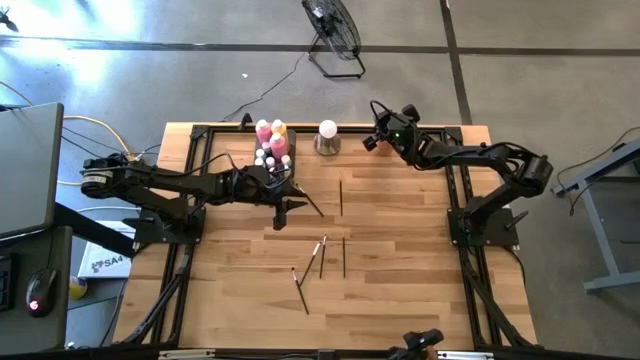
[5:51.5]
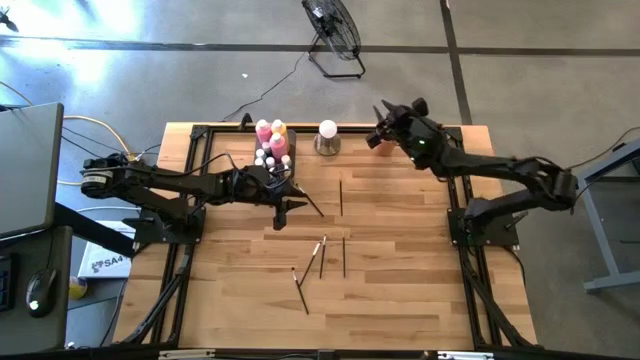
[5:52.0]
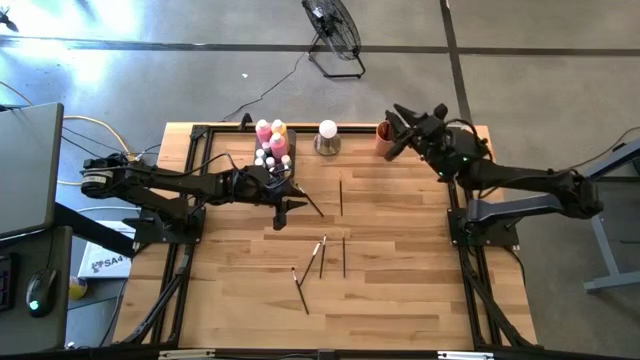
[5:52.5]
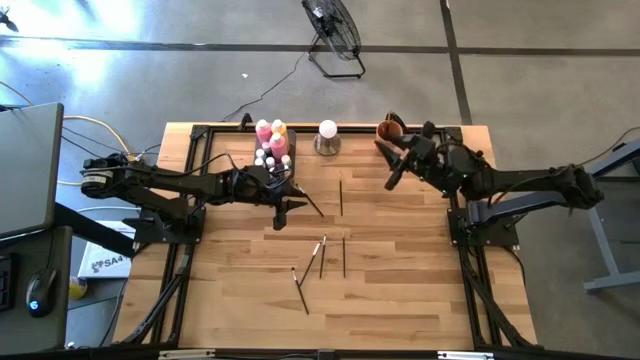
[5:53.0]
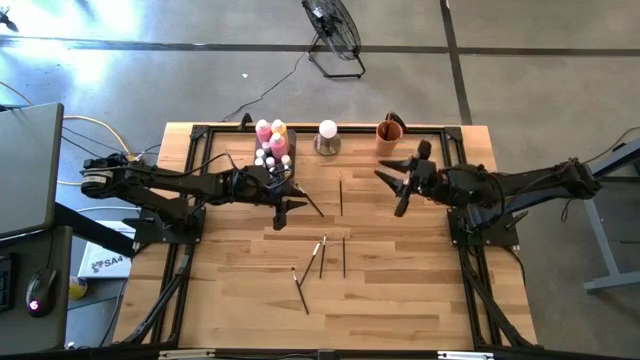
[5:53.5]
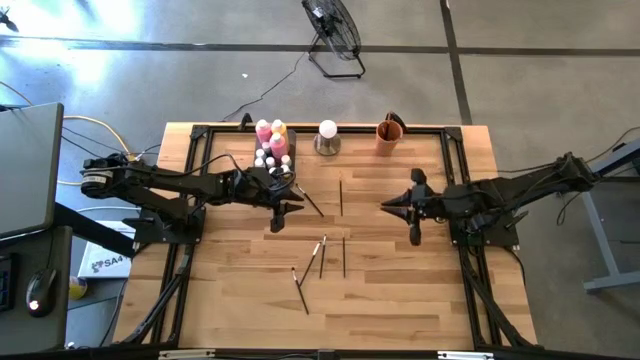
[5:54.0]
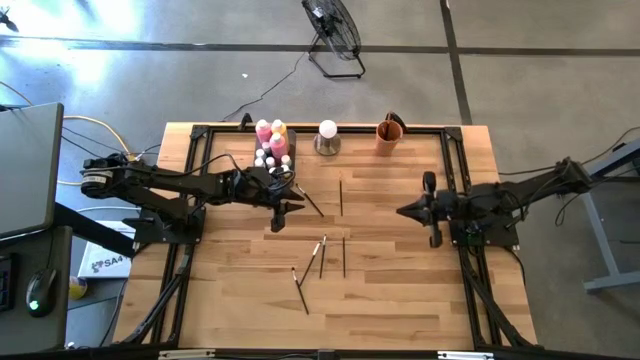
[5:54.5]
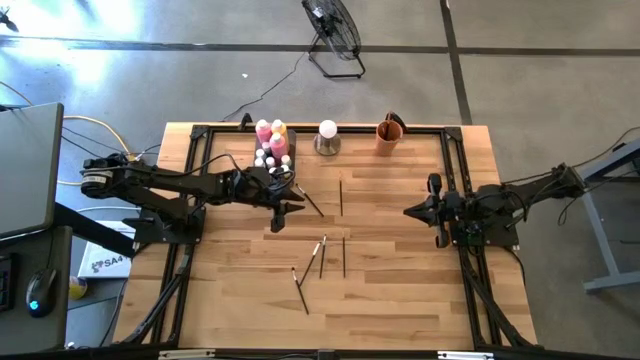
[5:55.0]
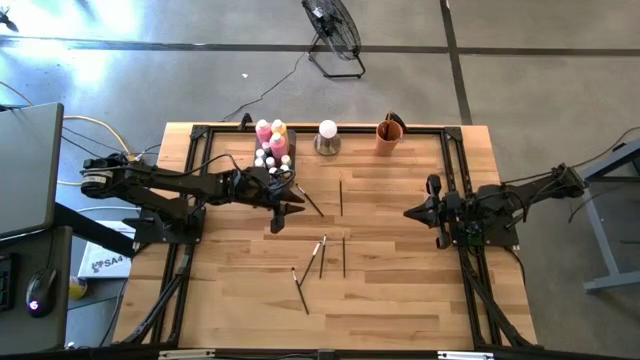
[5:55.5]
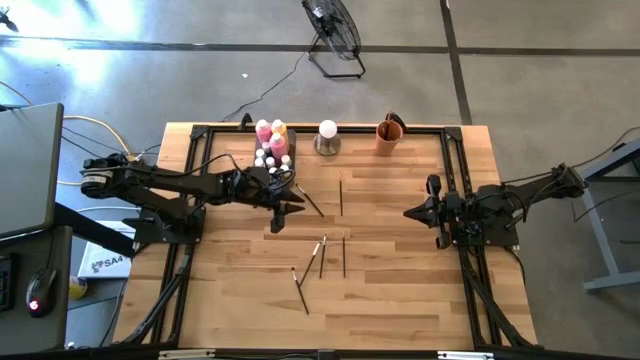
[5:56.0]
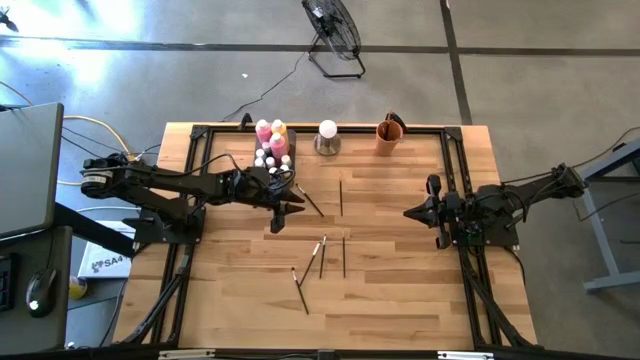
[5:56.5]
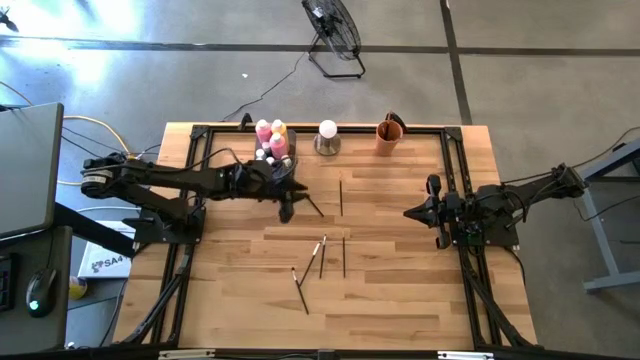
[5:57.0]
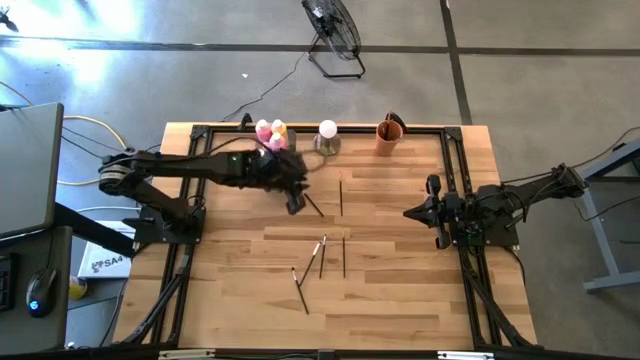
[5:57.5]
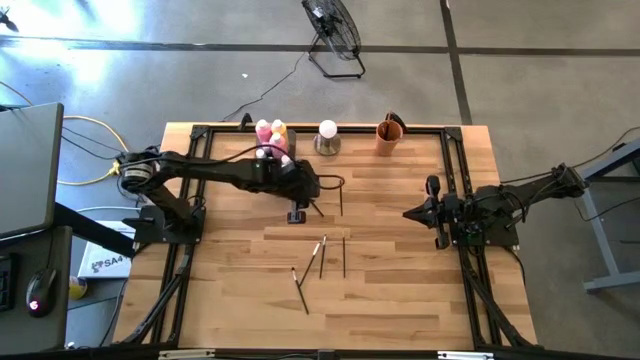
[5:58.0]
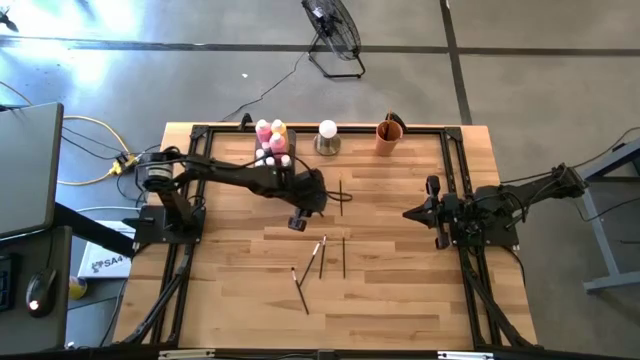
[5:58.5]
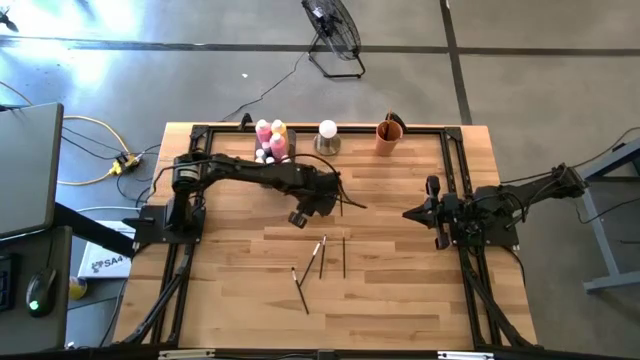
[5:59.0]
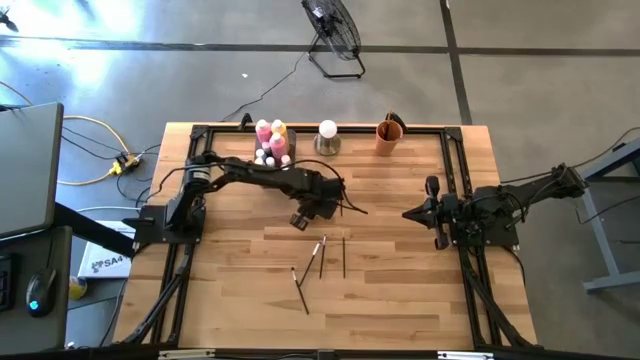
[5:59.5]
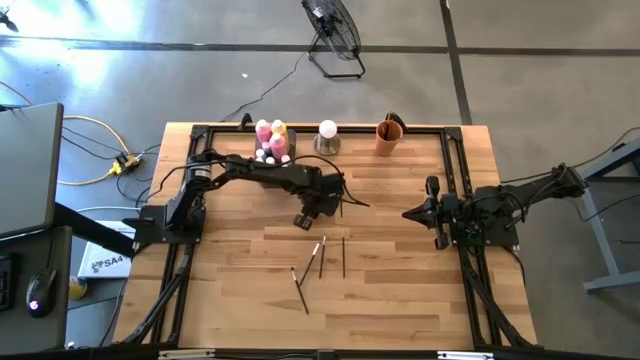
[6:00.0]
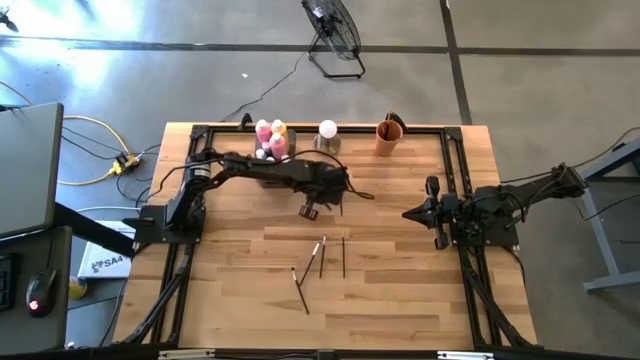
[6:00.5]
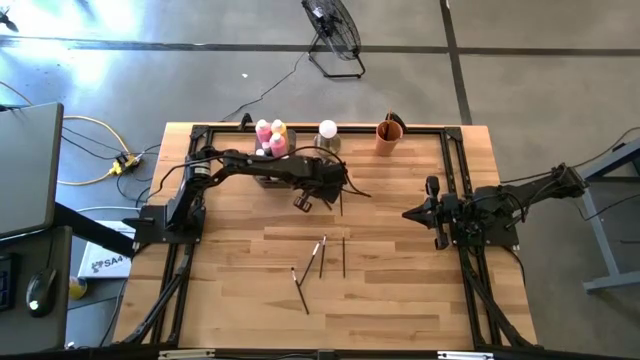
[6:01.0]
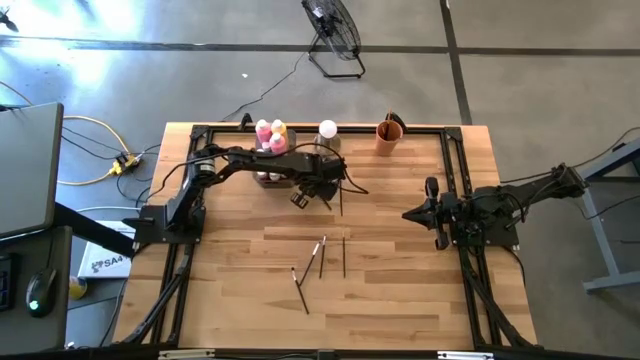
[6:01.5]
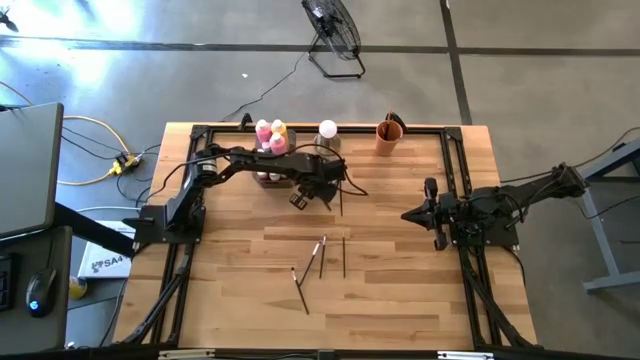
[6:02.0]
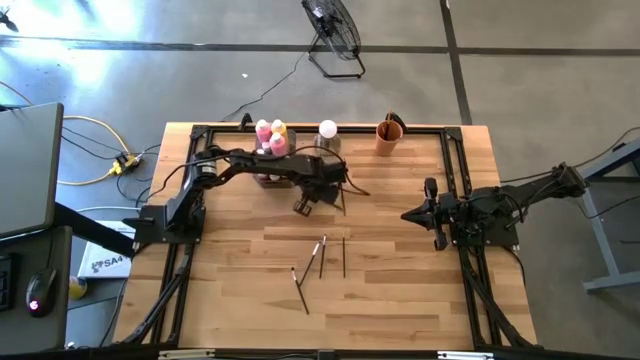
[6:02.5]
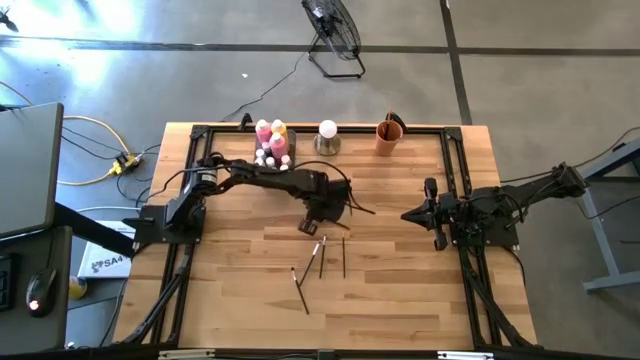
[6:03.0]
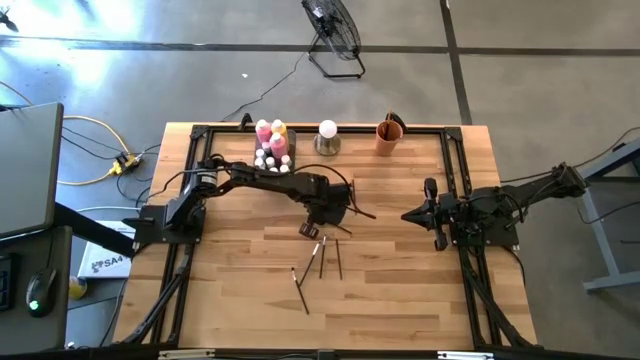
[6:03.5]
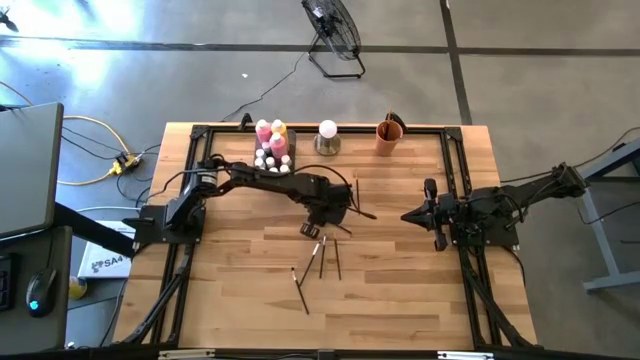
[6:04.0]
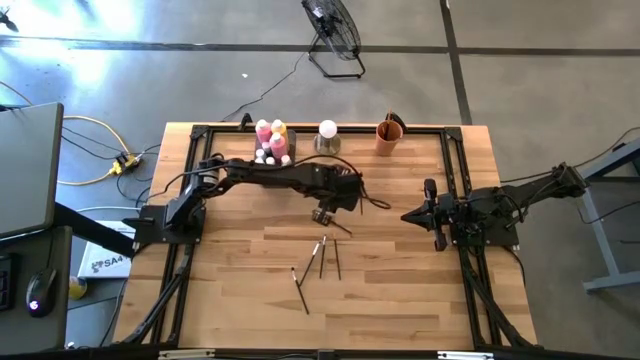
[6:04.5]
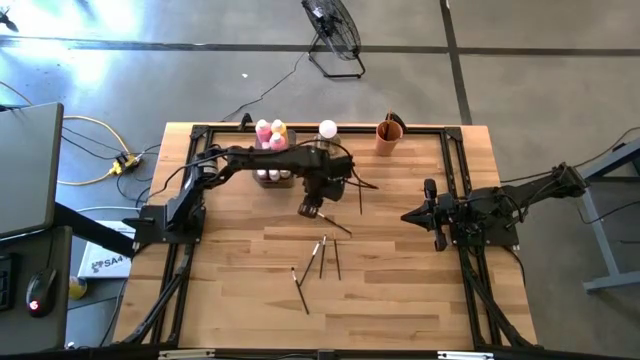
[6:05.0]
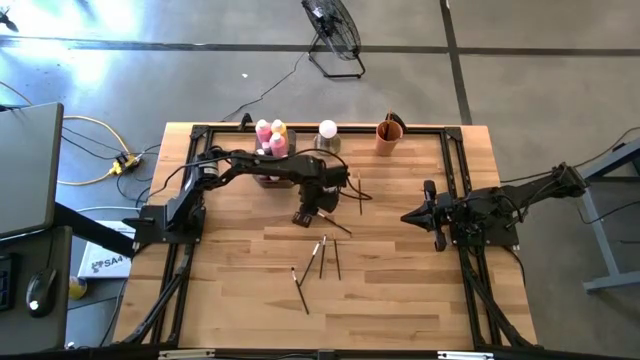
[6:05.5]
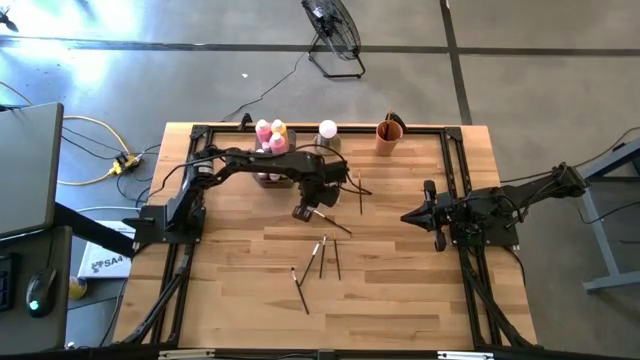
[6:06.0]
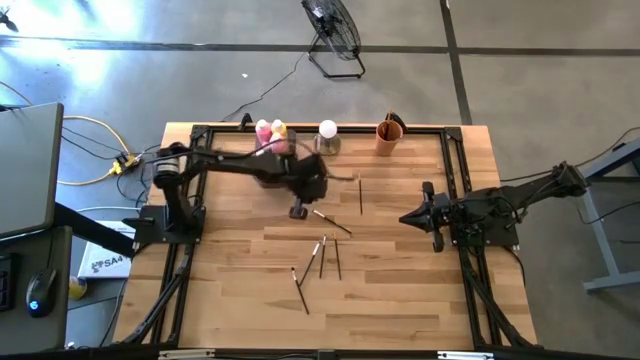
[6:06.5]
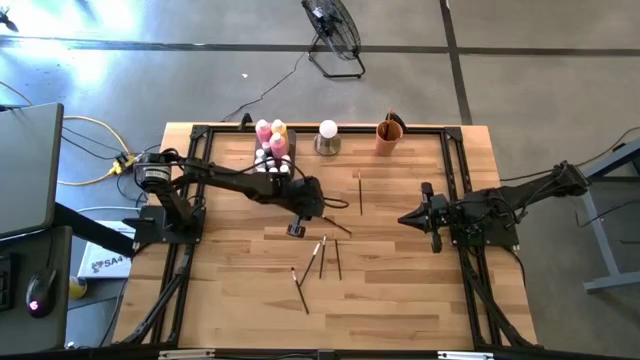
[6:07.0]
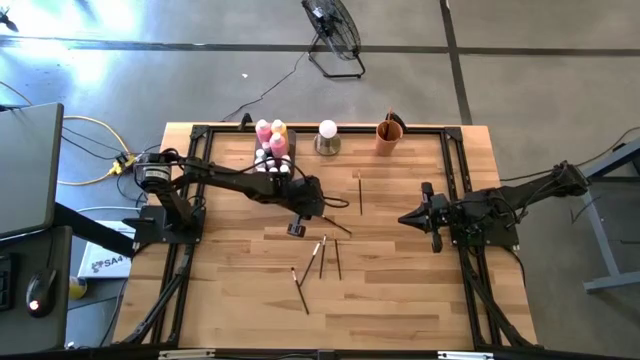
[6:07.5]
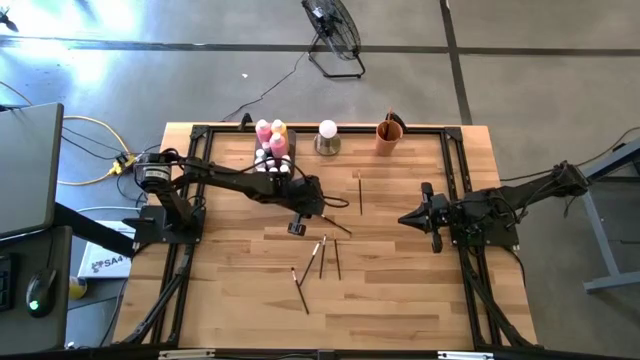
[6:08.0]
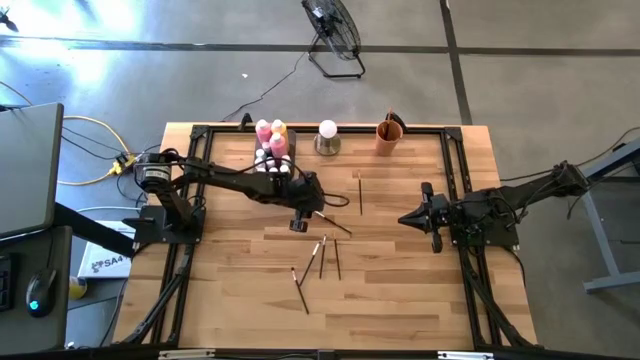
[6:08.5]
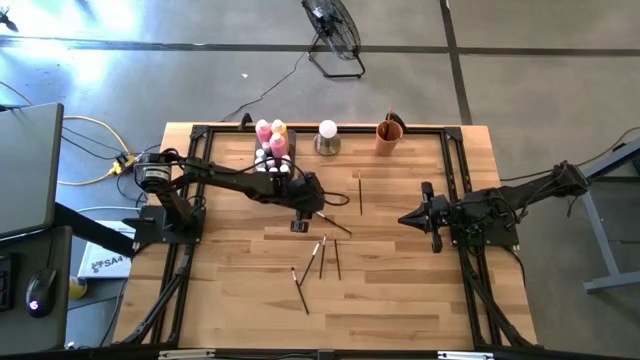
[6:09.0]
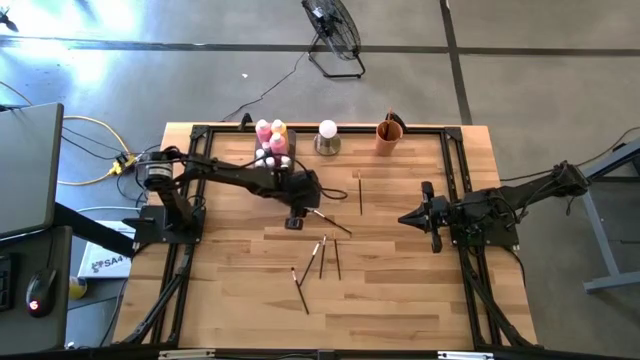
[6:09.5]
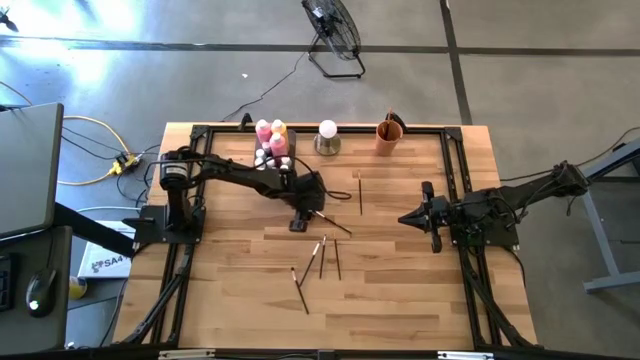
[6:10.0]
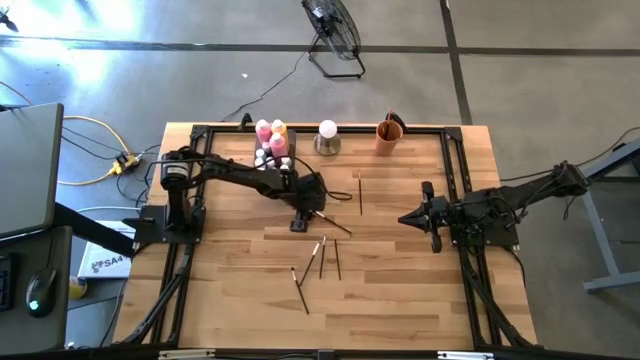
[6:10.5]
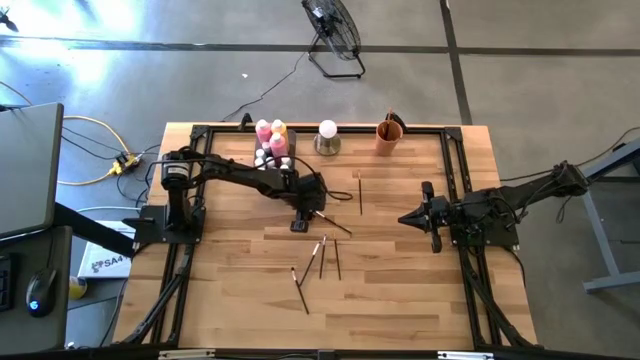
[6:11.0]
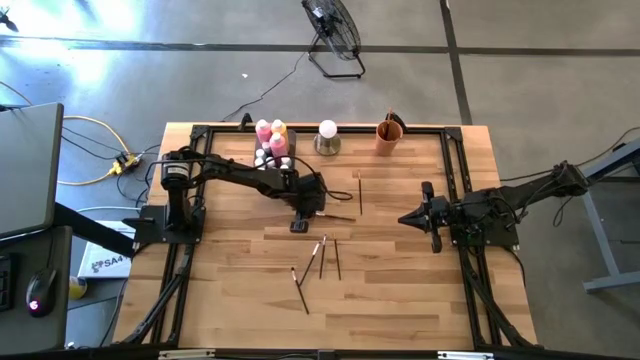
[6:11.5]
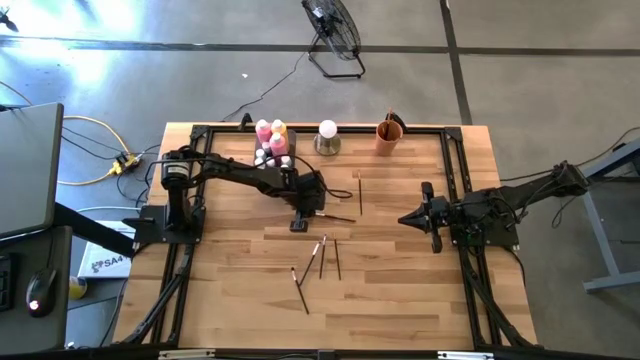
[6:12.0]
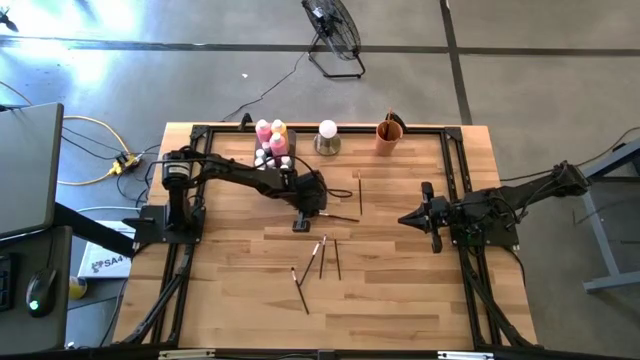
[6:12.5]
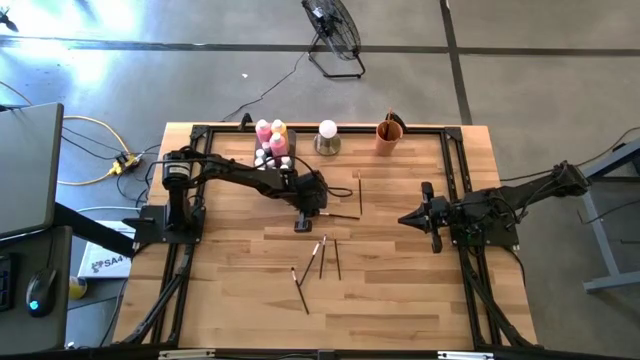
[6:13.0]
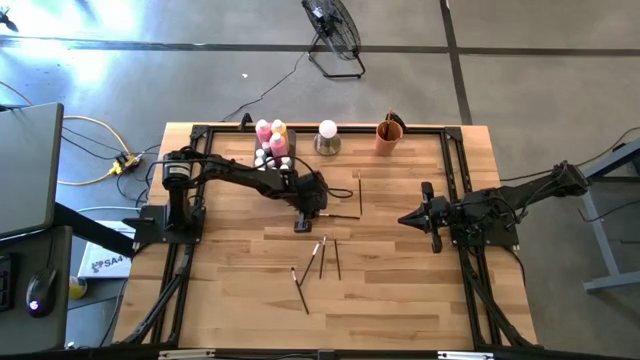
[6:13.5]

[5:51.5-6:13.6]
Task: Pick & Place Paint Supplies
Put the silver paintbrush into the orange cup
